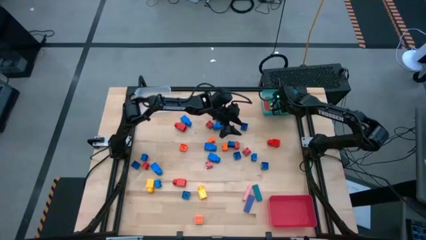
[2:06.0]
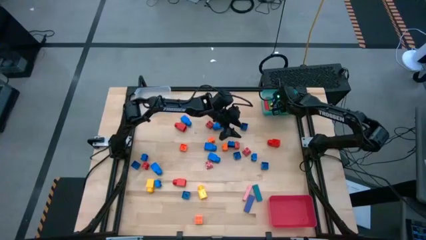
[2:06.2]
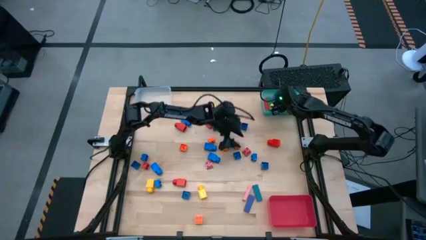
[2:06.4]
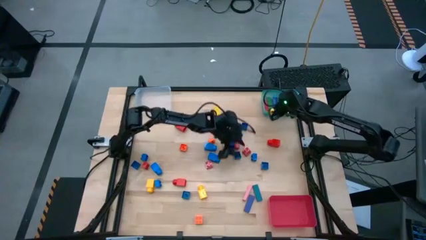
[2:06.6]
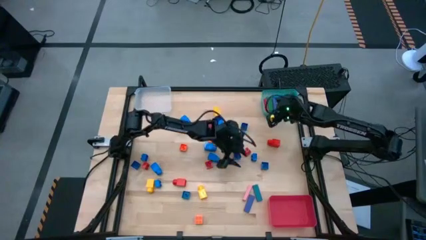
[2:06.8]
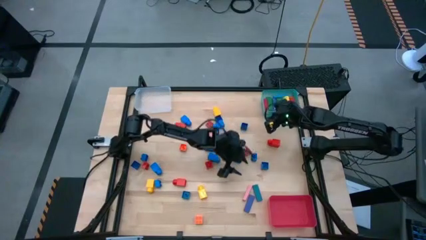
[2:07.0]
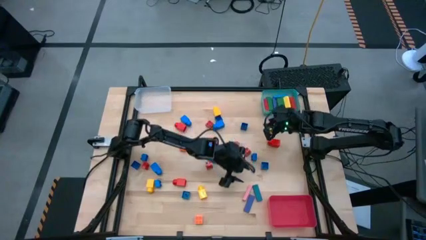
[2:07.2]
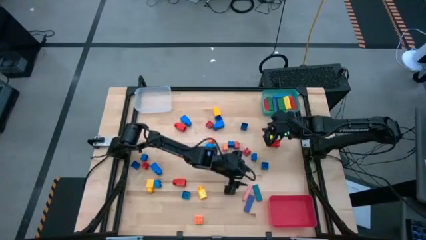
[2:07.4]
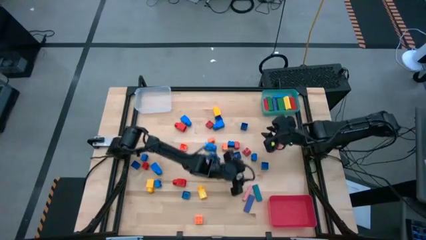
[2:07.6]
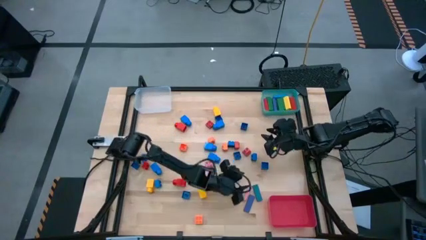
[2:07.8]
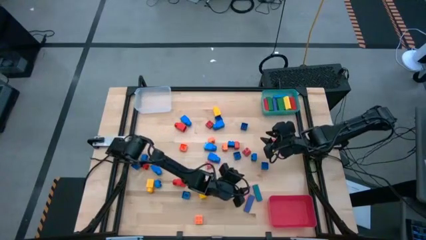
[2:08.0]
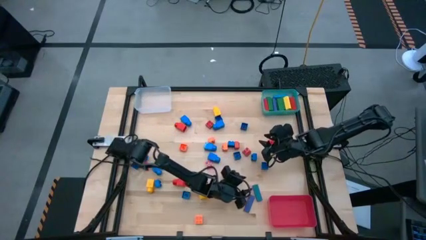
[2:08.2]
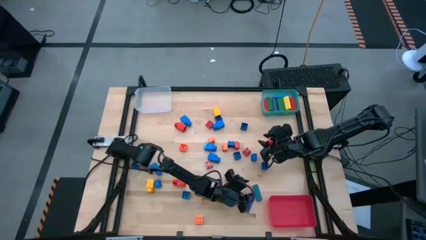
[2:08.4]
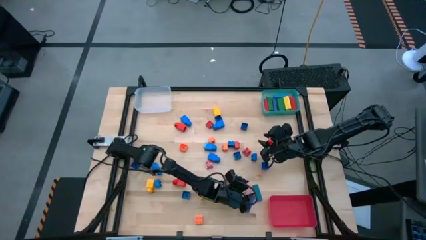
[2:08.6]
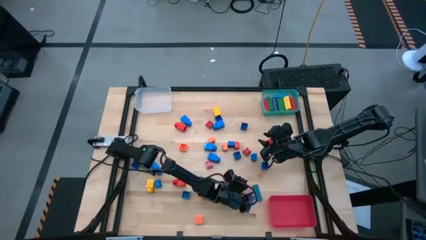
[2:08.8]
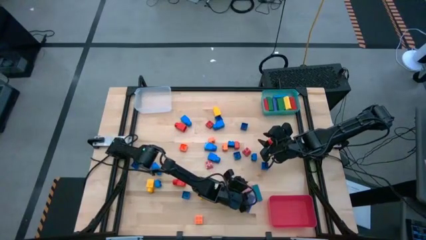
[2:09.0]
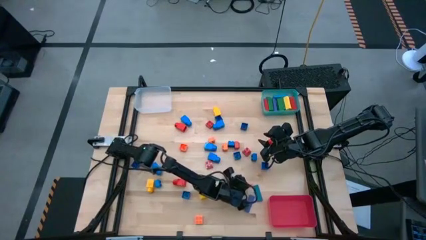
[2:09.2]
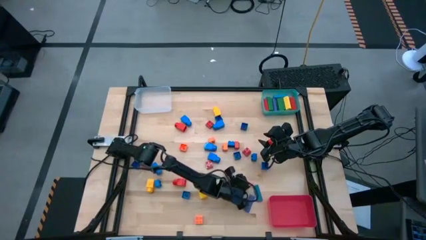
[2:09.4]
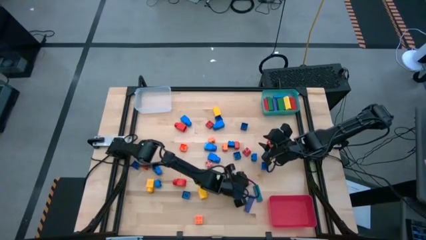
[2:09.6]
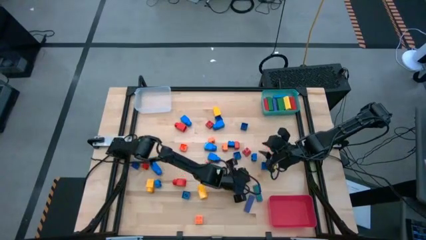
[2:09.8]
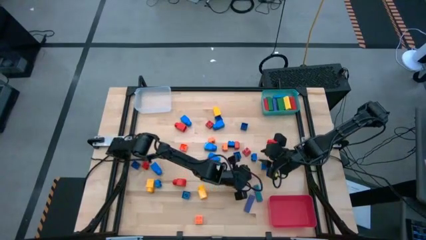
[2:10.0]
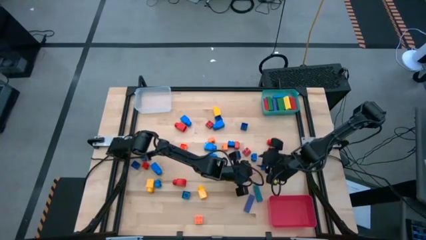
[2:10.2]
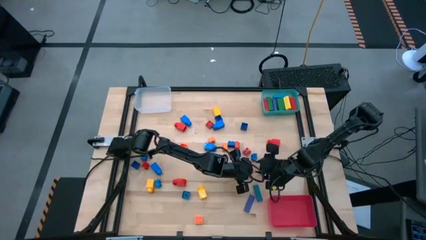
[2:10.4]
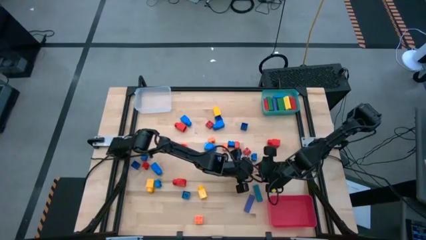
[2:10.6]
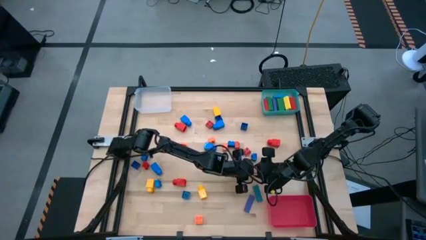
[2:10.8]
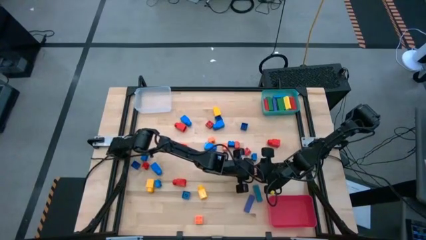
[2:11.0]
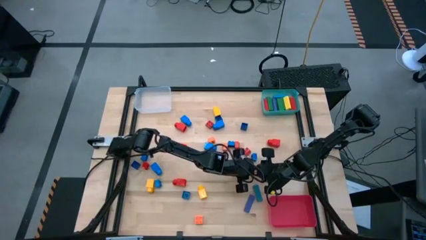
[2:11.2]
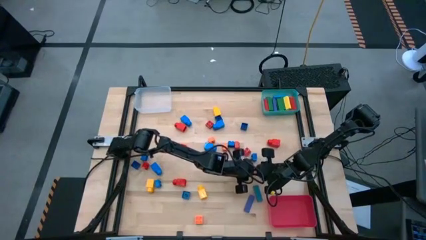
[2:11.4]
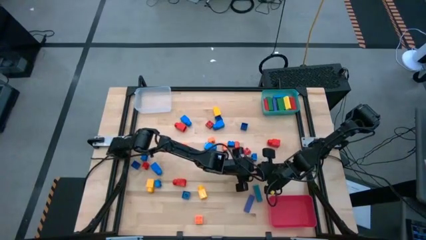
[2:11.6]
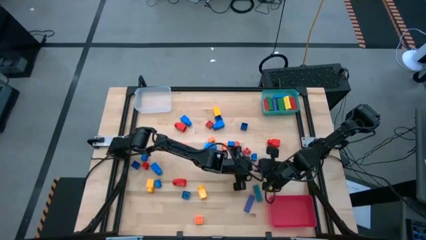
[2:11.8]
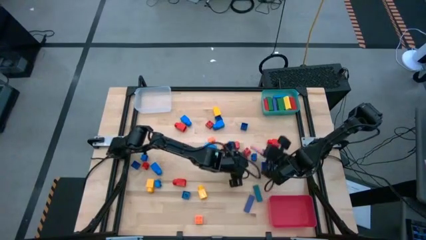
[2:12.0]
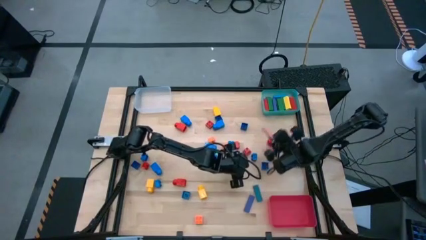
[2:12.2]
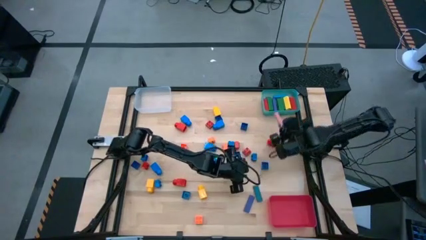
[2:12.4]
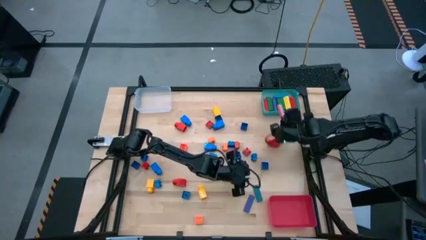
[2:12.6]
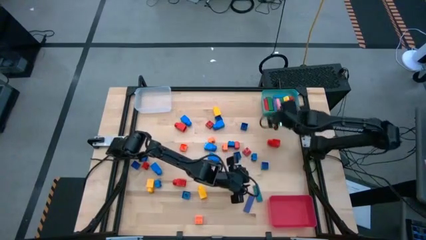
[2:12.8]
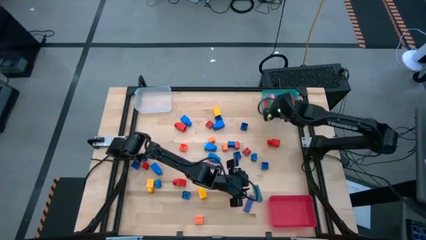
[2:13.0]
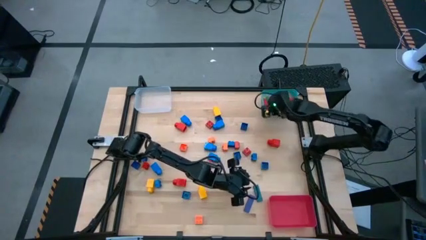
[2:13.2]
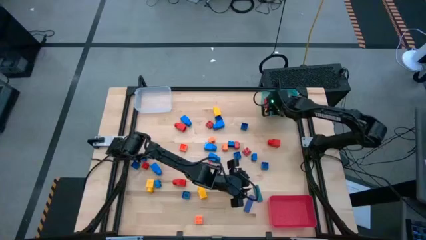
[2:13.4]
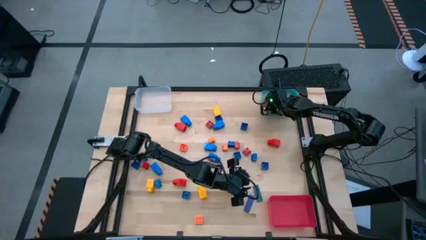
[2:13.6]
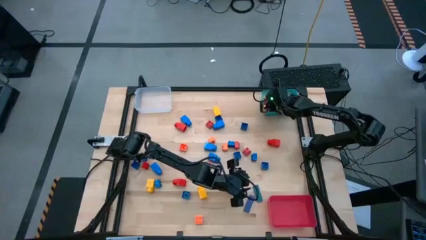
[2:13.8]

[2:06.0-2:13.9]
Task: Sort blocks by size
Put the pink block into the blue bin

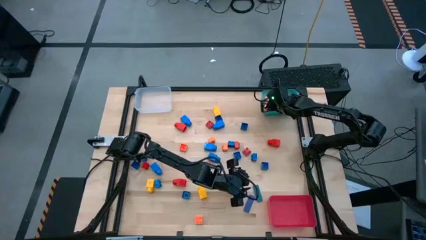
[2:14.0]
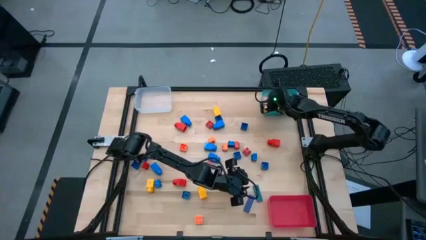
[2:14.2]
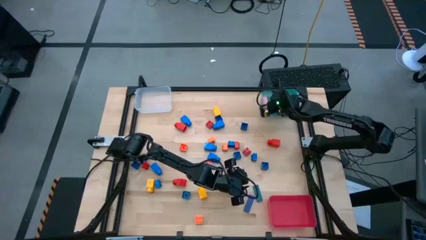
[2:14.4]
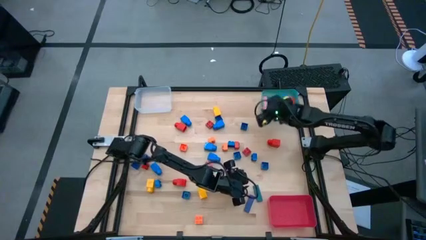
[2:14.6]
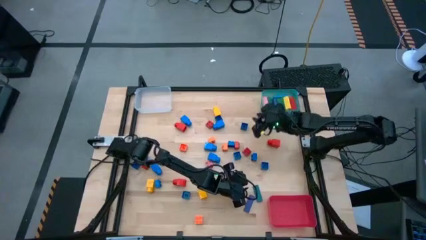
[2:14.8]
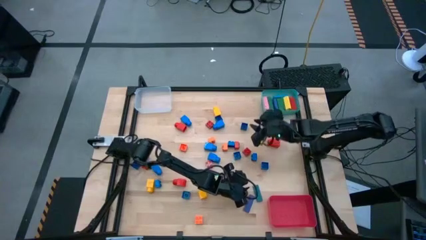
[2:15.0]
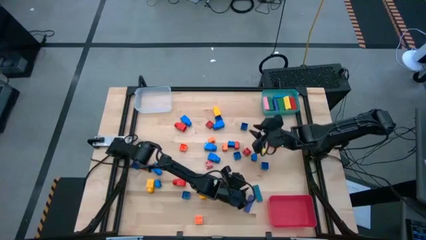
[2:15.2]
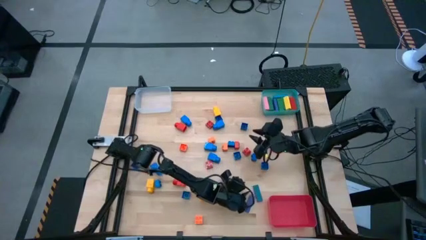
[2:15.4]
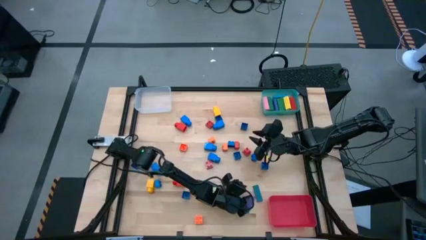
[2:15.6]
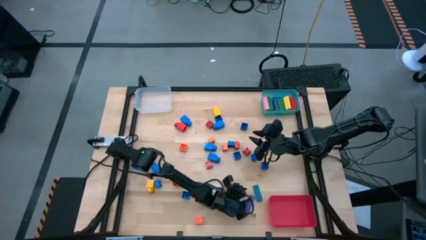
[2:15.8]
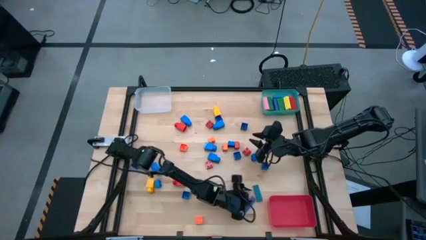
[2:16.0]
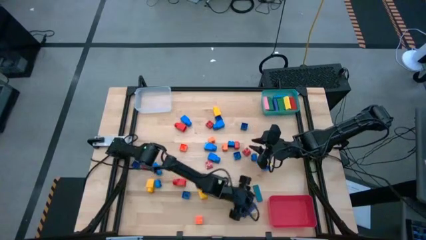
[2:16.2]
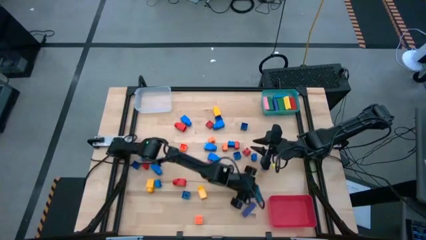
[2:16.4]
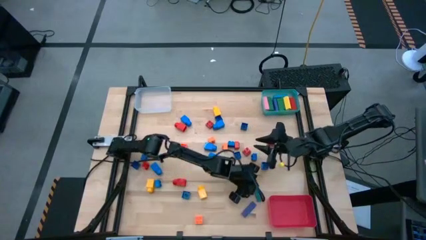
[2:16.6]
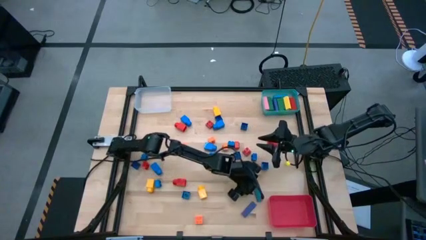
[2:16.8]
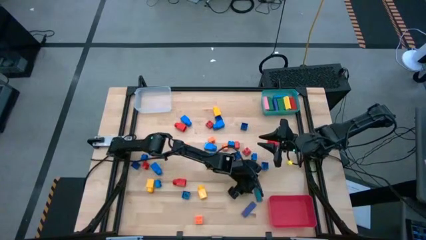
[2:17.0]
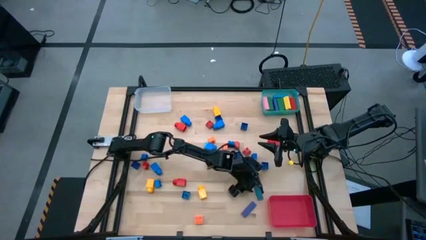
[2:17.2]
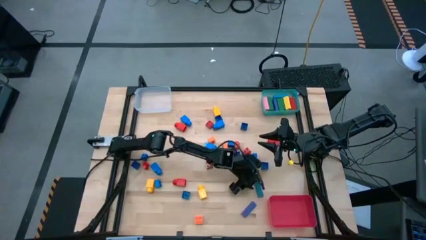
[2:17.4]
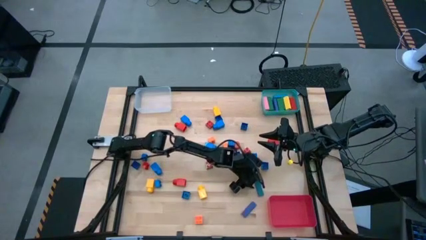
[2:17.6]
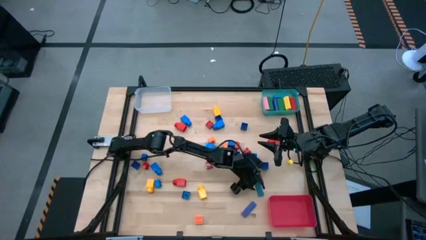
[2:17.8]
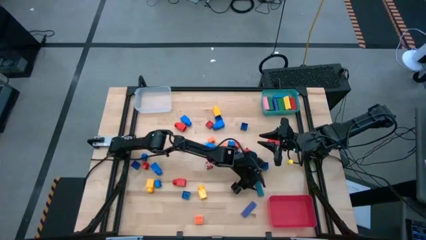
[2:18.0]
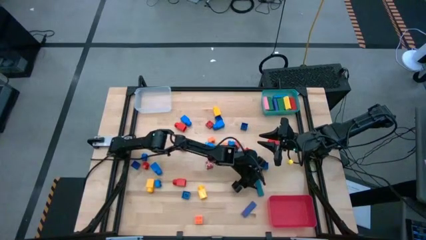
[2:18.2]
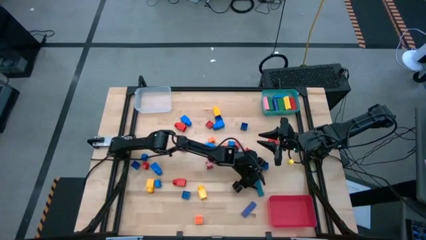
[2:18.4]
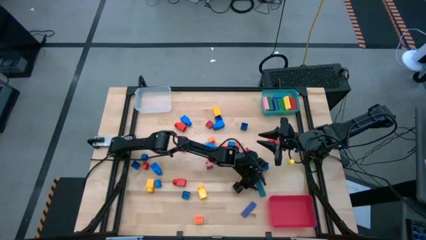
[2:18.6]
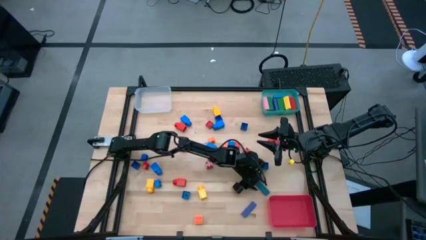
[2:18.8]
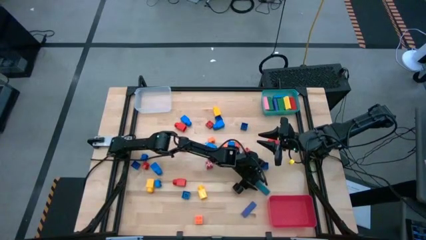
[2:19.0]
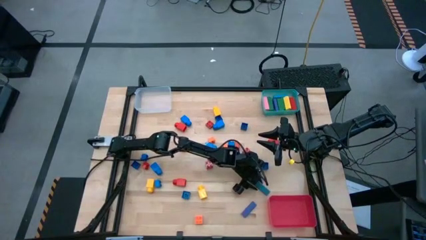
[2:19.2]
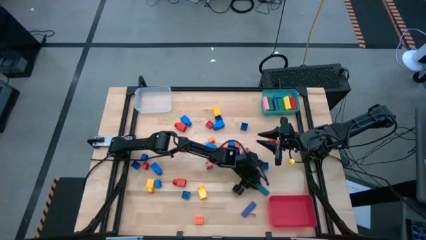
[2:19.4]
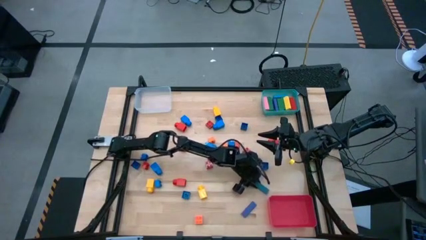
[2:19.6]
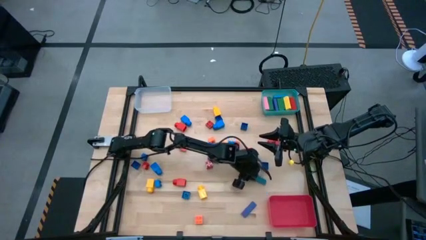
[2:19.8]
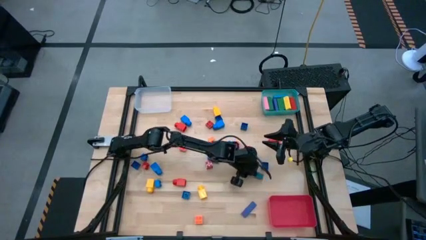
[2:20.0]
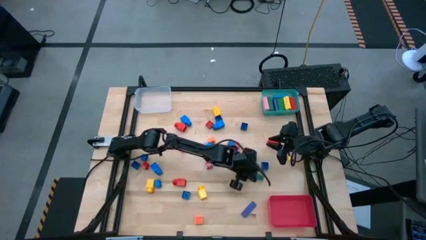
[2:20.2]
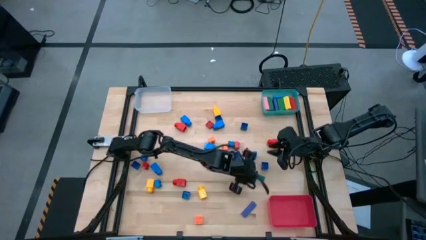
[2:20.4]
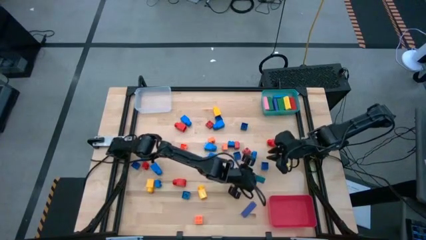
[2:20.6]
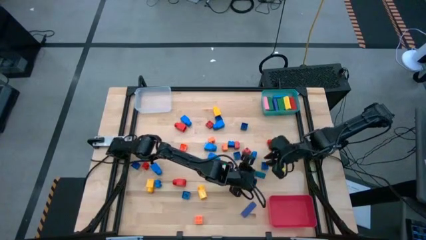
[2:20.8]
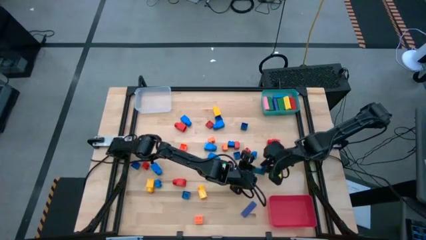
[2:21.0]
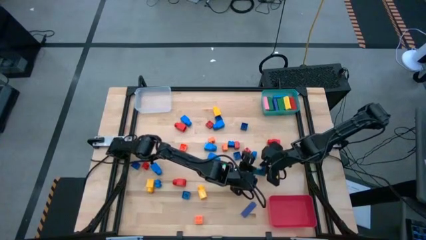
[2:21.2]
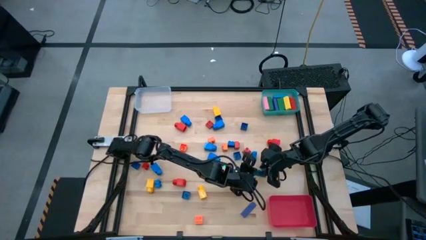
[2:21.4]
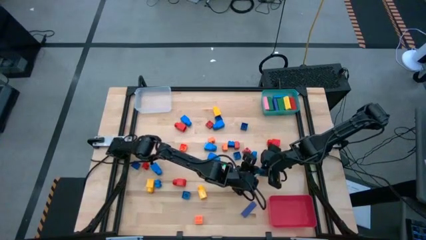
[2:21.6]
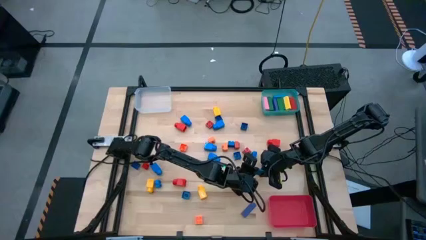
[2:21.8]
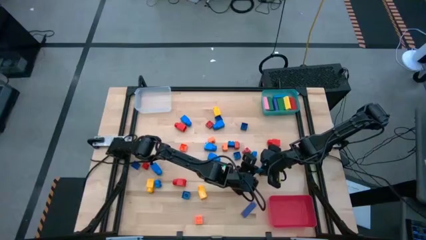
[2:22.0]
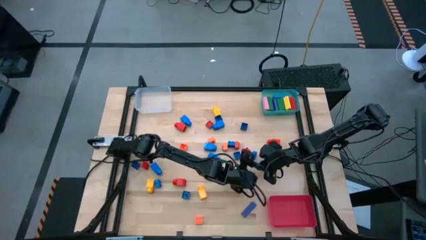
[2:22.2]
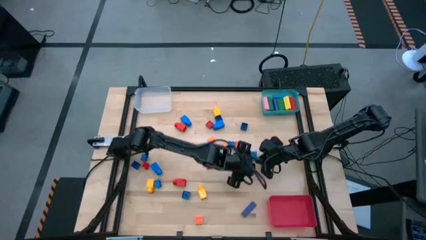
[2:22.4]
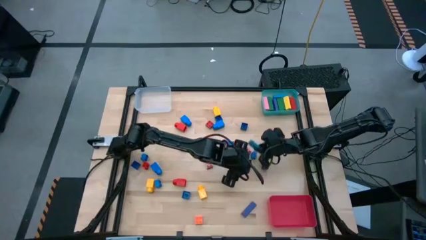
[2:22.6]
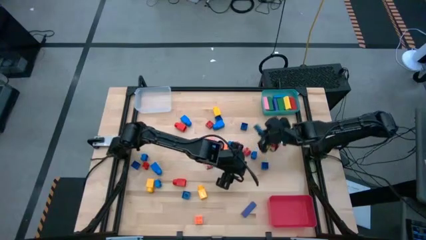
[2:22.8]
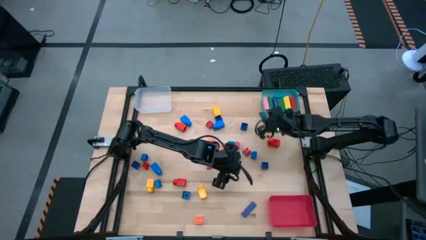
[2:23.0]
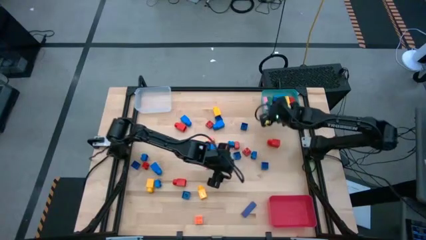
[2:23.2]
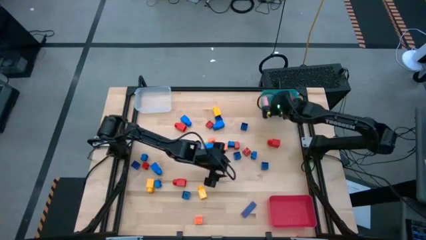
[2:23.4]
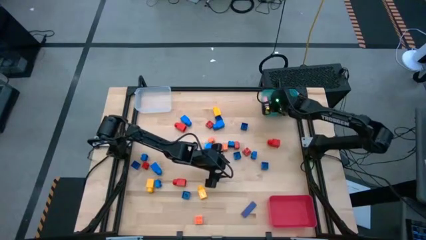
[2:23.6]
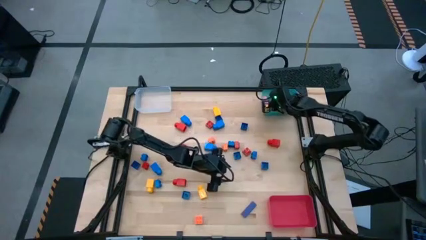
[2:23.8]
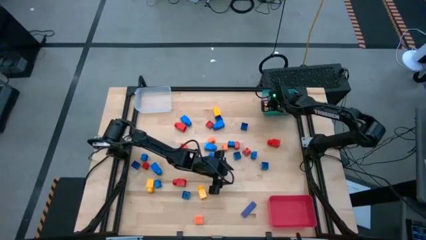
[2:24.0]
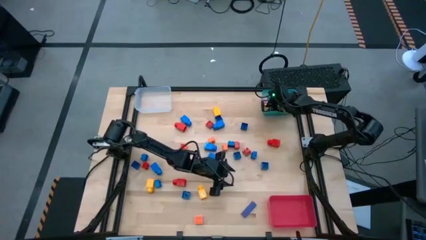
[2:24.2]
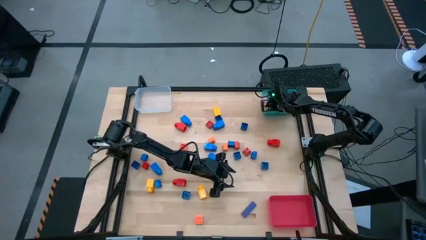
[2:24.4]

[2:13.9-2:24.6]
Put the blue block into the blue bin
